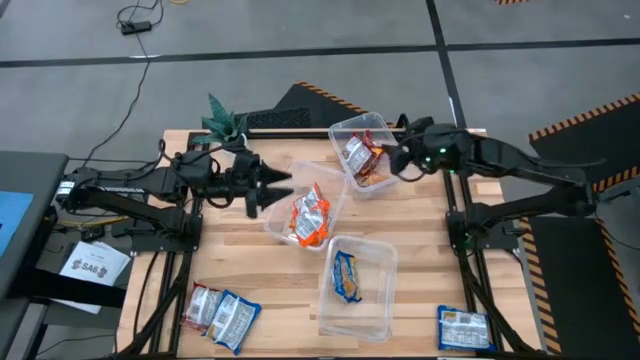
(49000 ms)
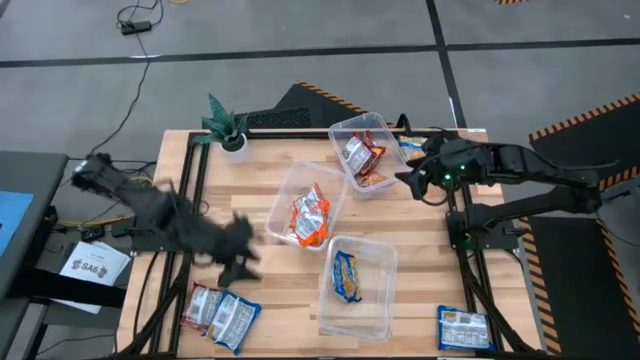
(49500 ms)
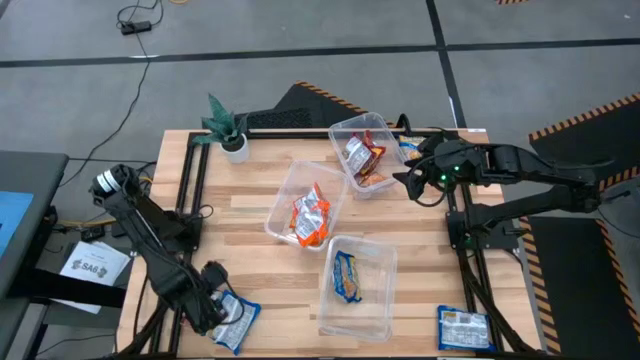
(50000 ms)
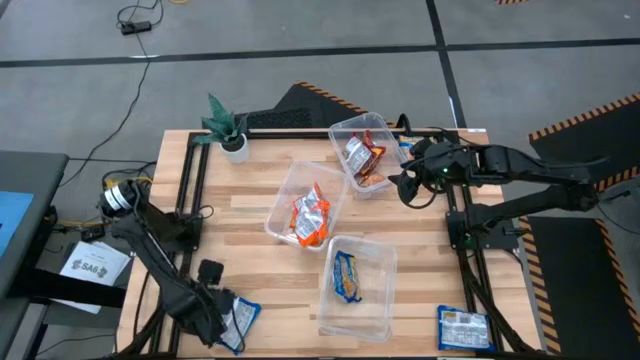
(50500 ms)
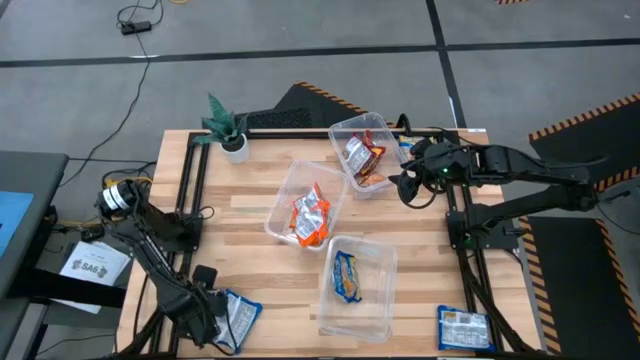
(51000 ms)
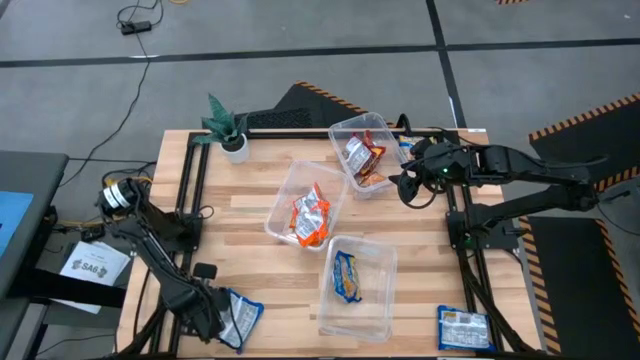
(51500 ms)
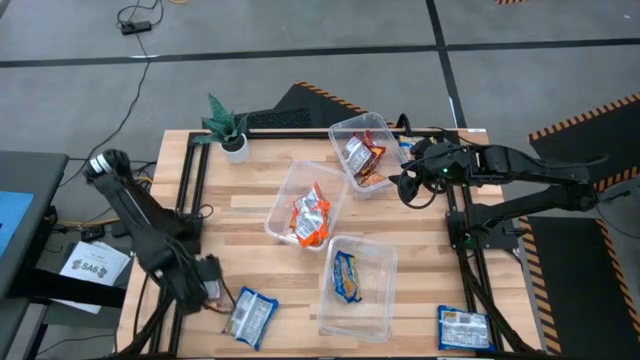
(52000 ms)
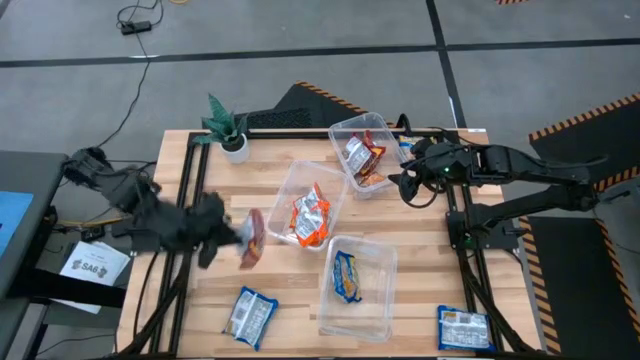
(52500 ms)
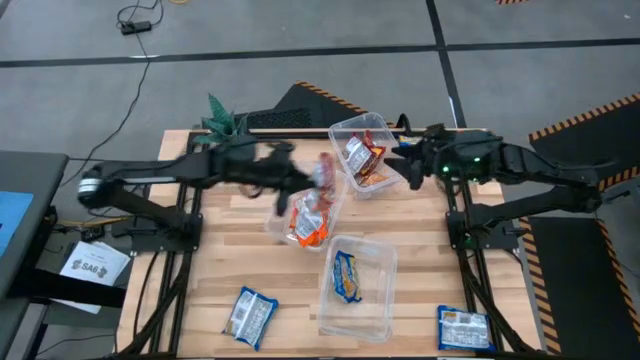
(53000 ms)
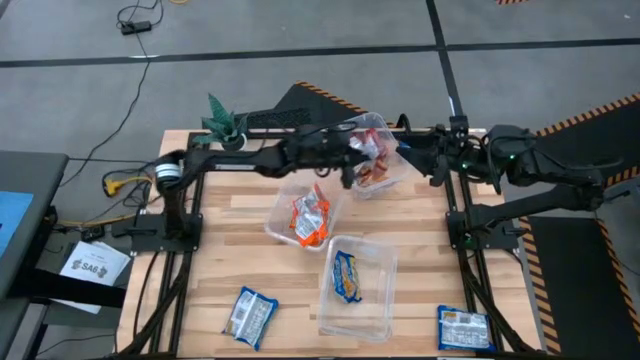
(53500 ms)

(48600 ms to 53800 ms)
Task: Sort Maruchan noodles
Put the red noodle pack into the top transparent bin

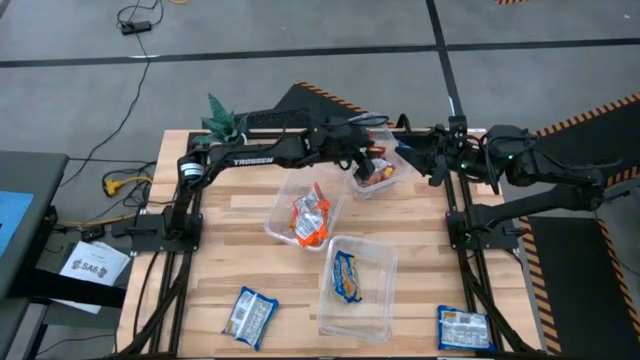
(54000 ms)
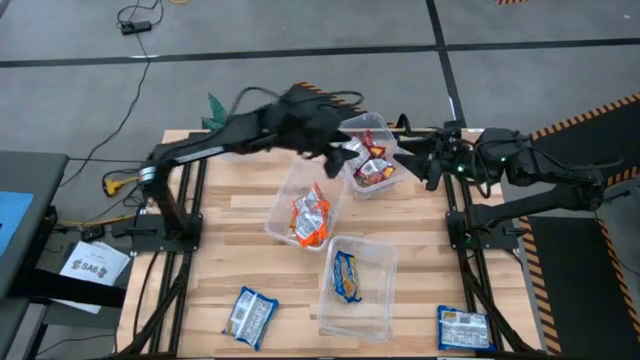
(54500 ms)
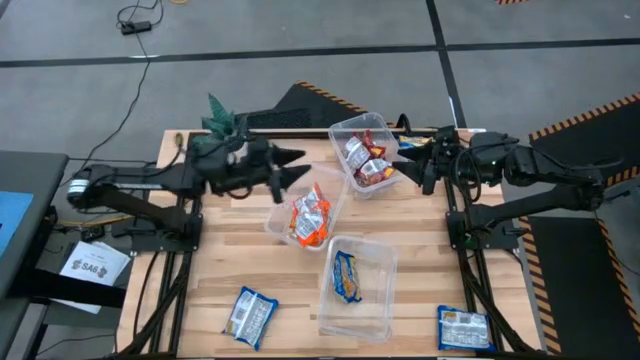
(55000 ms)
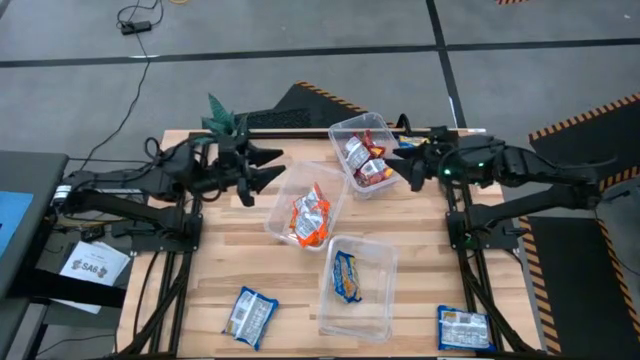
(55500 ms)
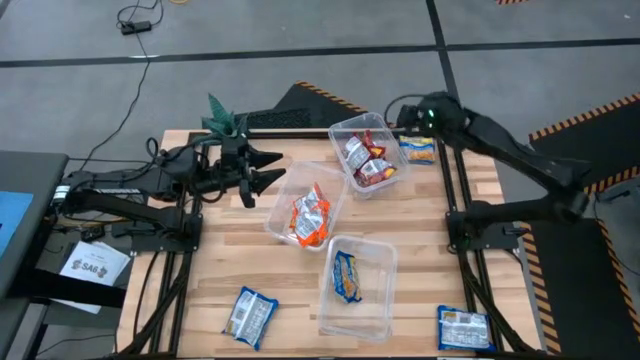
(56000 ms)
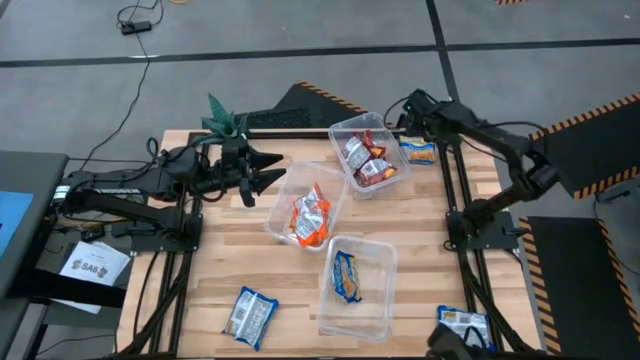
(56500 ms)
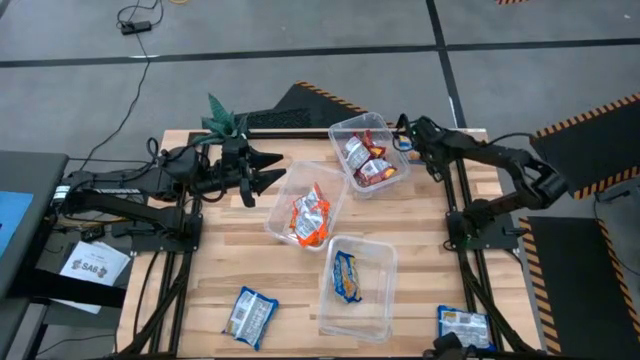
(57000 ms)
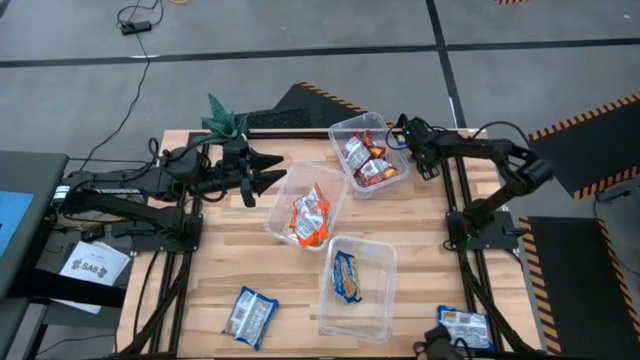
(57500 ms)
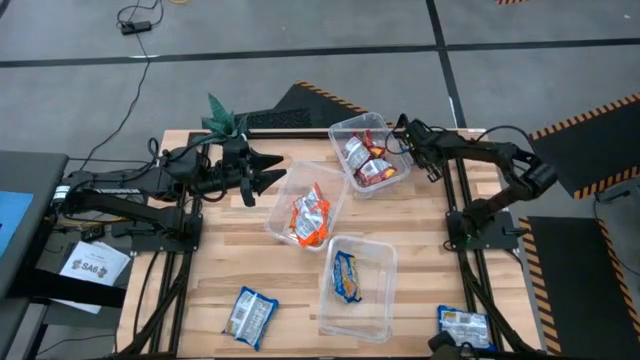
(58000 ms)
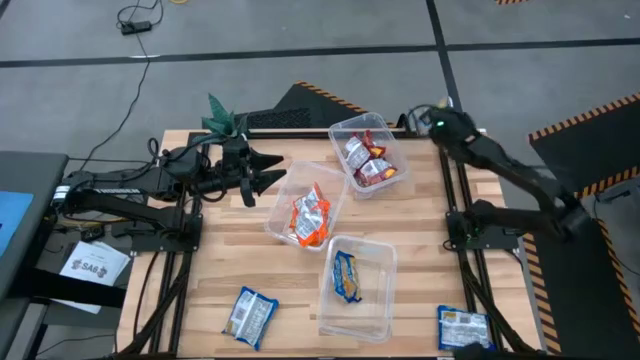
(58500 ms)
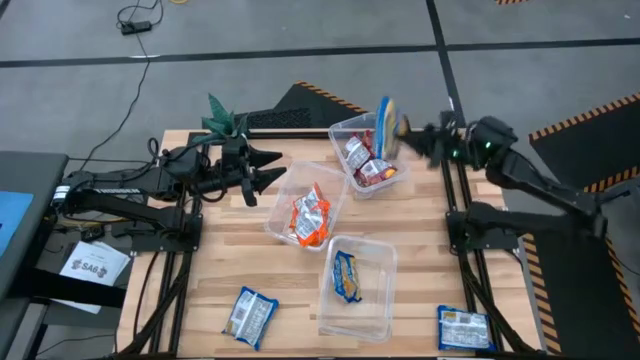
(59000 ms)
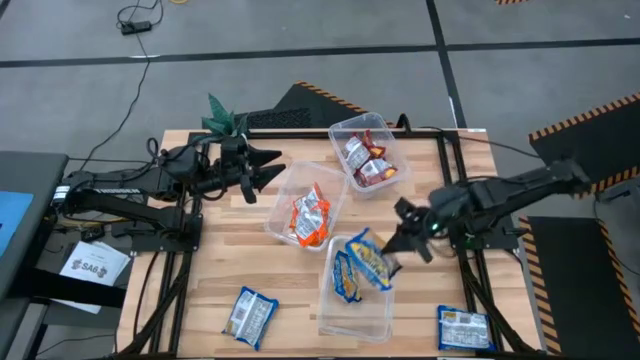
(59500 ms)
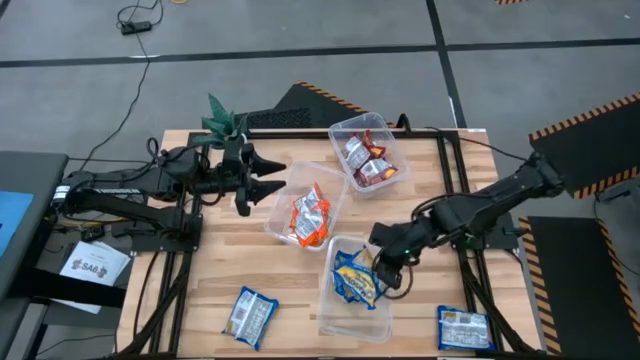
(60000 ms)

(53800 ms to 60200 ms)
Put the blue noodle pack into the bottom transparent bin

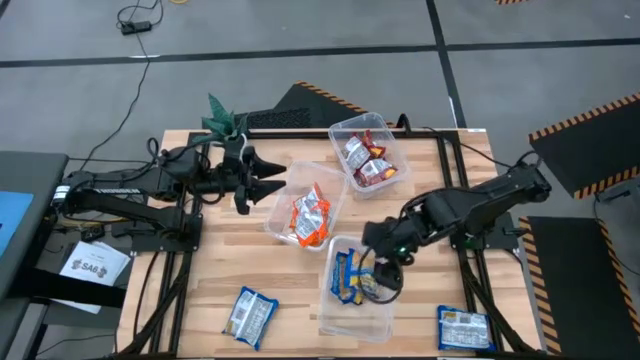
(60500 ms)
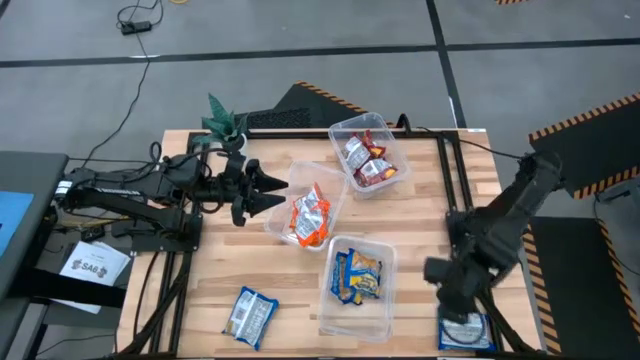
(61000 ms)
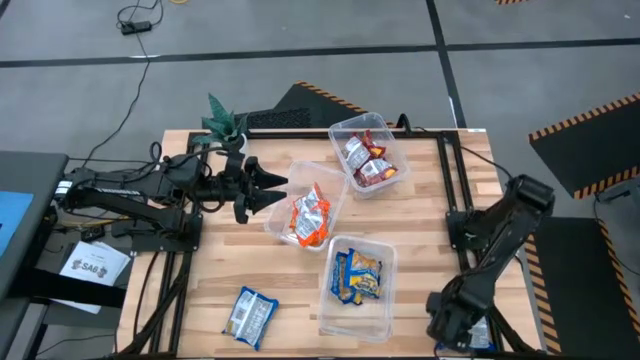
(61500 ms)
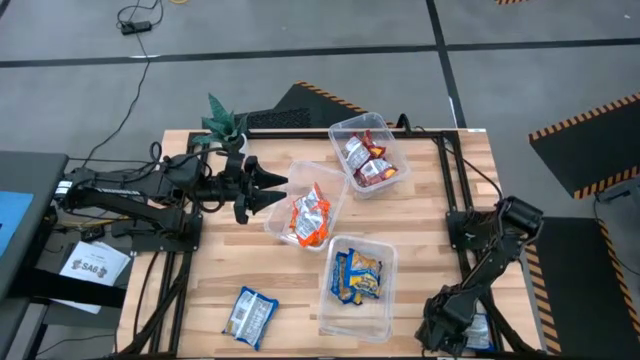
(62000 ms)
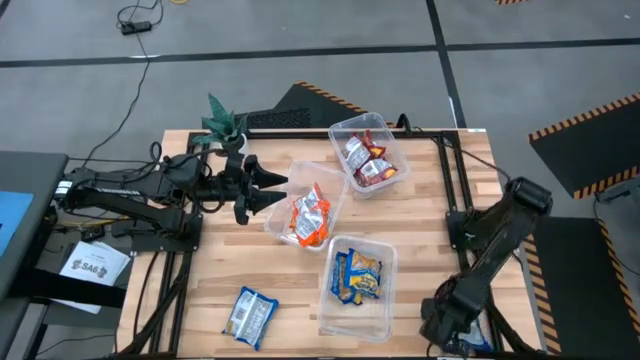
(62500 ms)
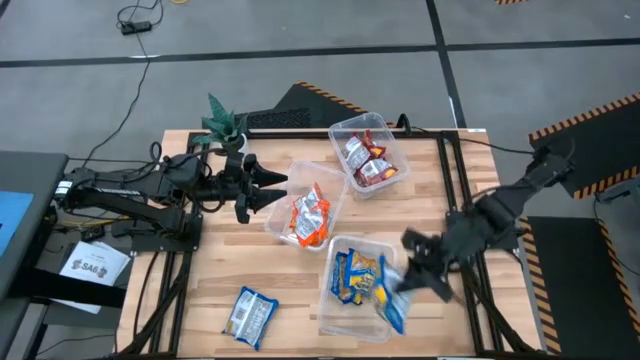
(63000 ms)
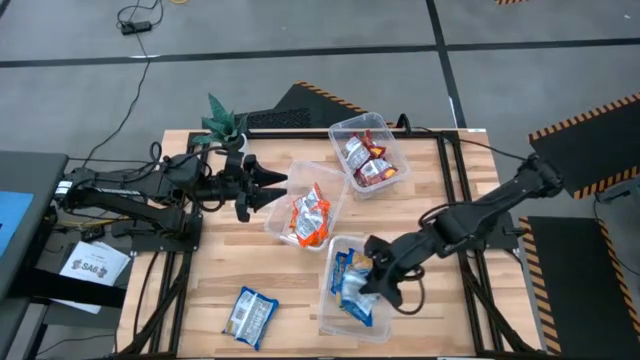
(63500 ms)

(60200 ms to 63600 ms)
Put the blue noodle pack into the bottom transparent bin

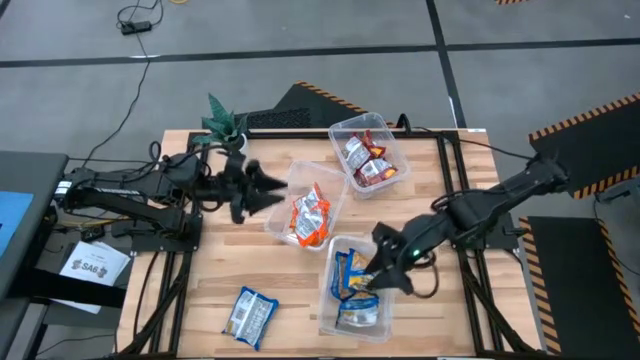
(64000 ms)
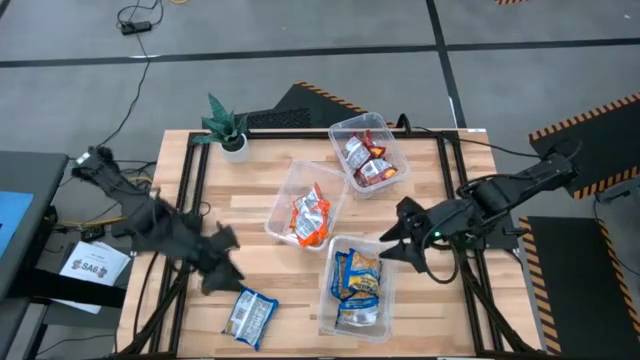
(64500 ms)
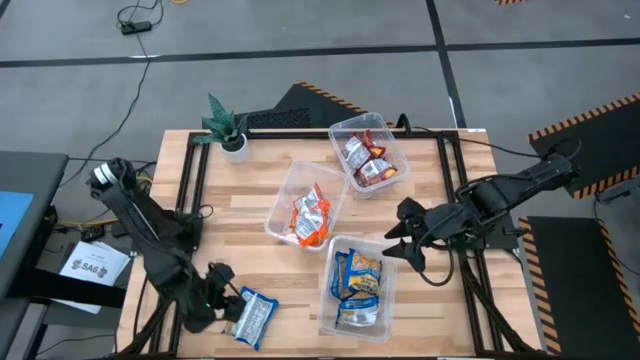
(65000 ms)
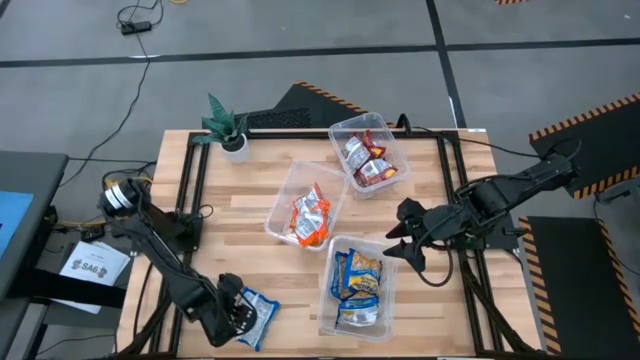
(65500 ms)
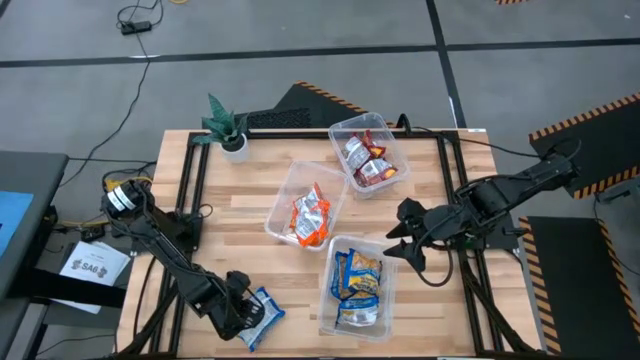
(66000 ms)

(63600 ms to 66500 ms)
Put the blue noodle pack into the bottom transparent bin

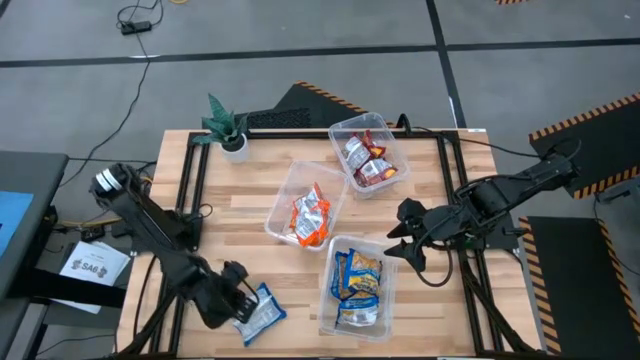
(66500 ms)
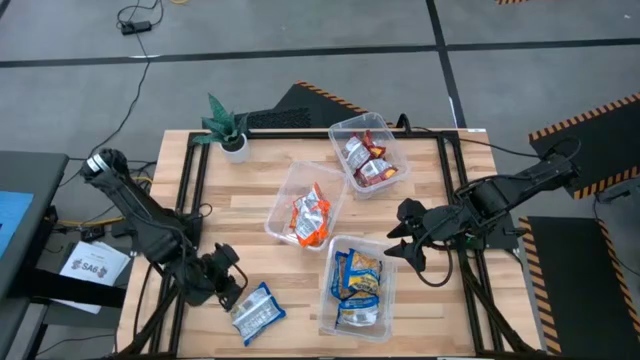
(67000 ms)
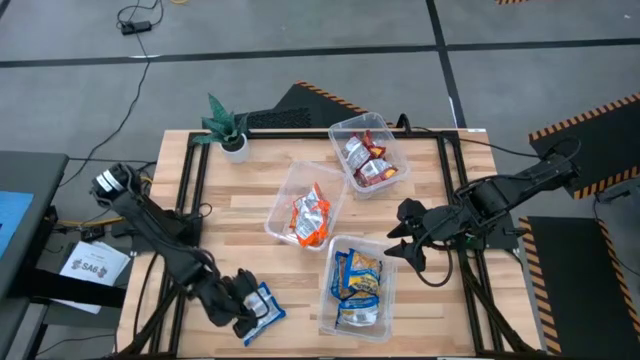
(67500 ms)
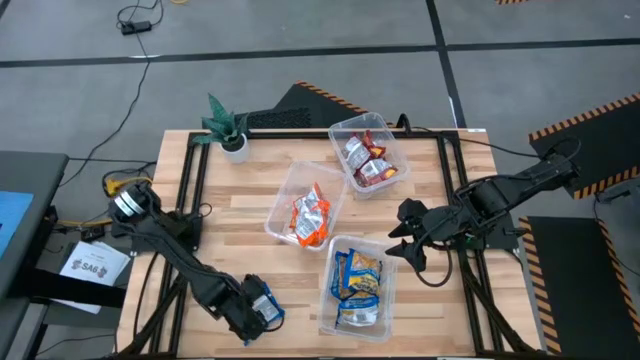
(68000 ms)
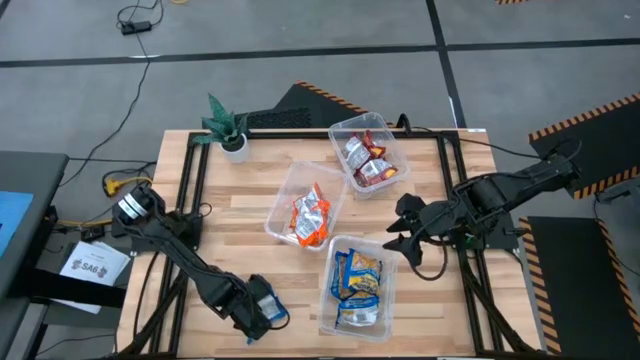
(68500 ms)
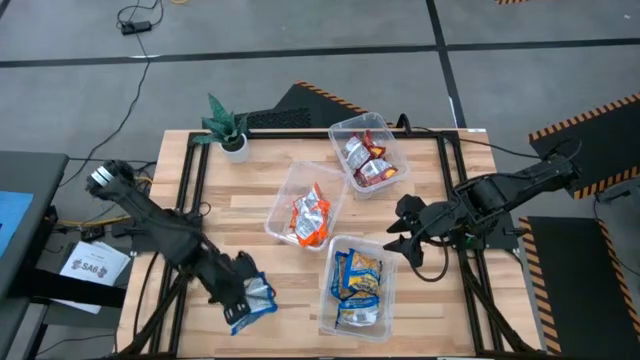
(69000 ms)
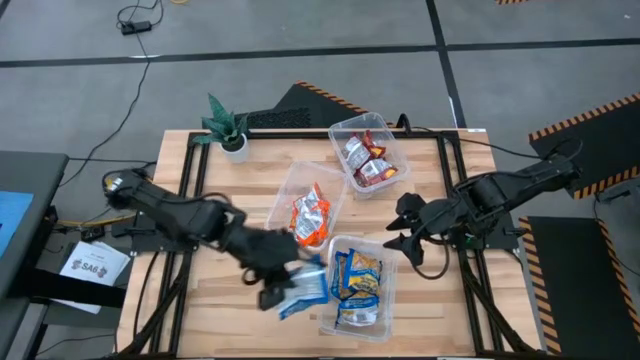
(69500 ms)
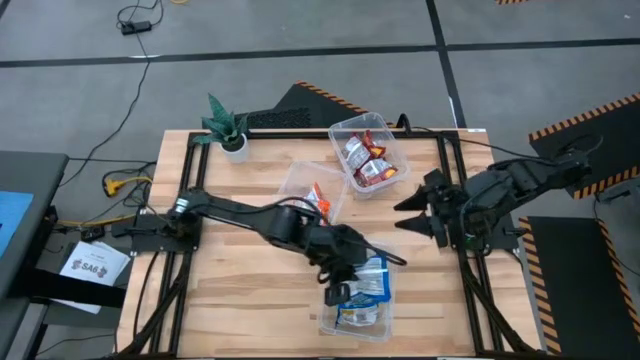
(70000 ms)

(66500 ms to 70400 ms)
Put the blue noodle pack into the bottom transparent bin
